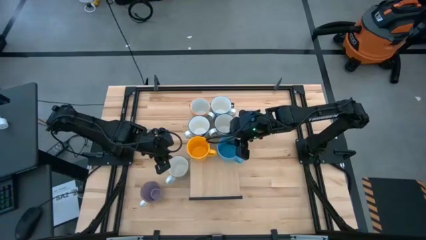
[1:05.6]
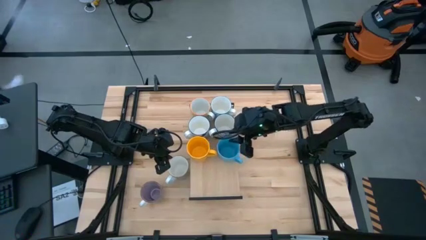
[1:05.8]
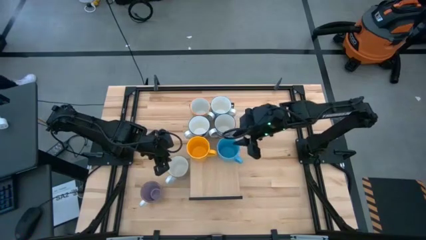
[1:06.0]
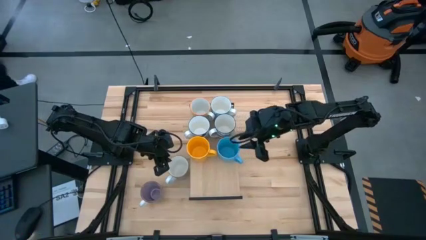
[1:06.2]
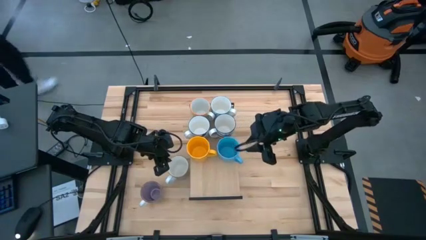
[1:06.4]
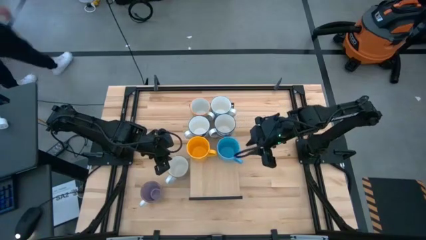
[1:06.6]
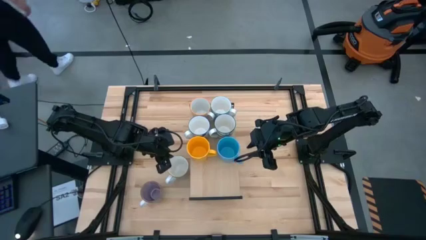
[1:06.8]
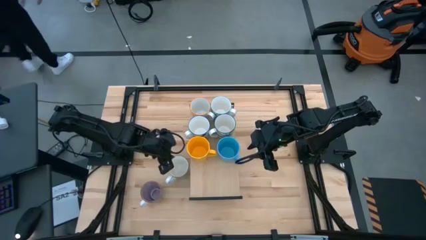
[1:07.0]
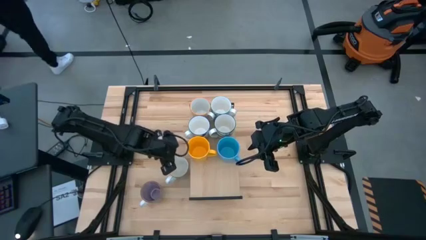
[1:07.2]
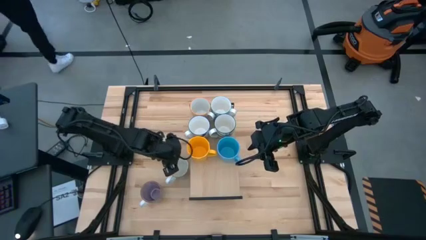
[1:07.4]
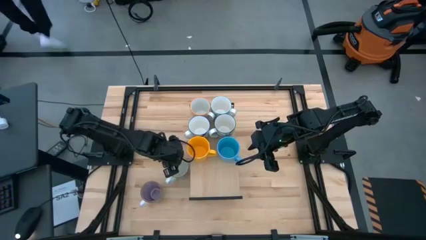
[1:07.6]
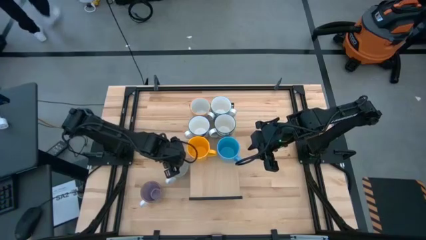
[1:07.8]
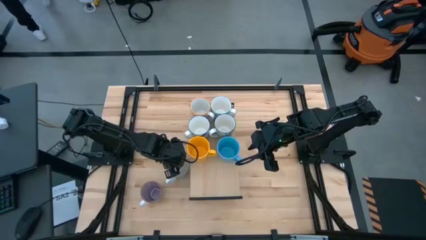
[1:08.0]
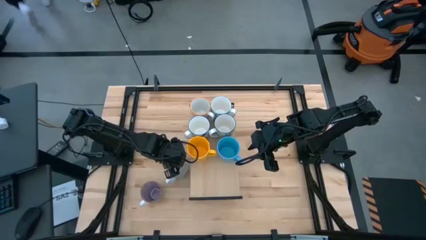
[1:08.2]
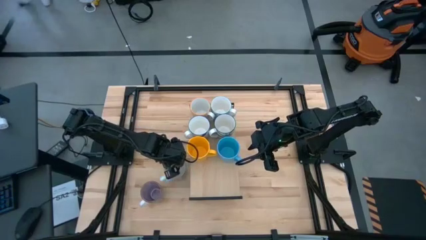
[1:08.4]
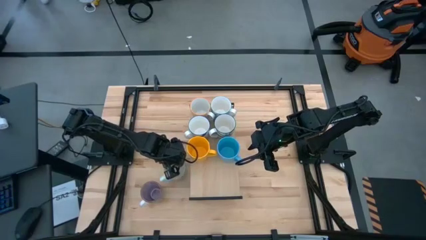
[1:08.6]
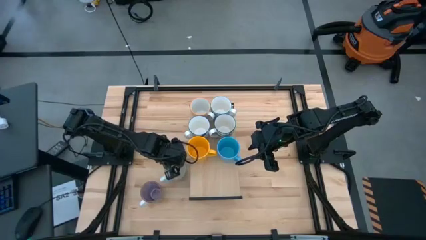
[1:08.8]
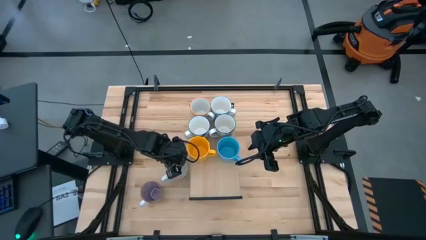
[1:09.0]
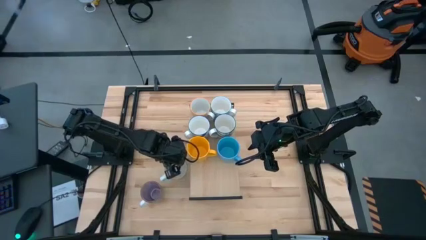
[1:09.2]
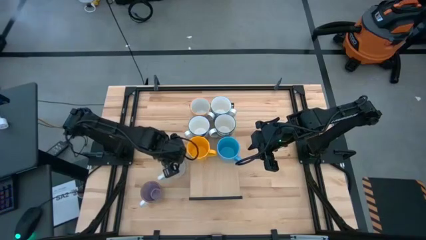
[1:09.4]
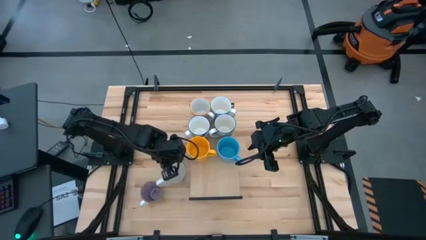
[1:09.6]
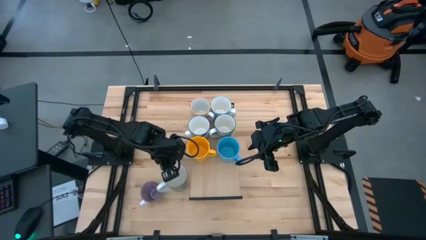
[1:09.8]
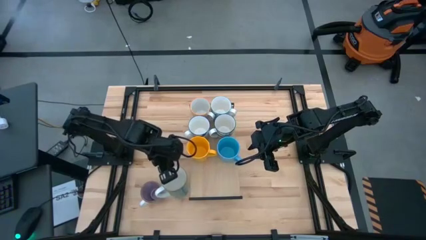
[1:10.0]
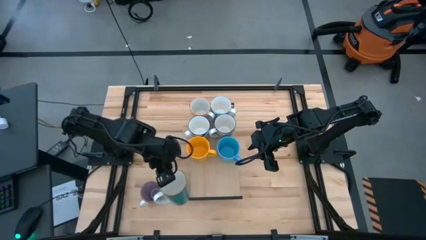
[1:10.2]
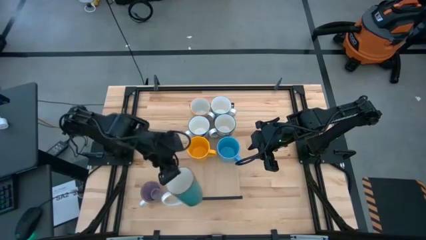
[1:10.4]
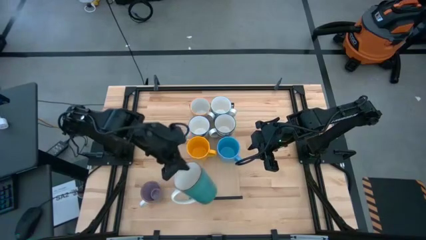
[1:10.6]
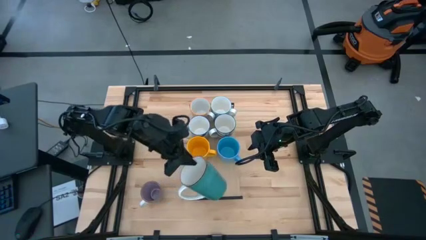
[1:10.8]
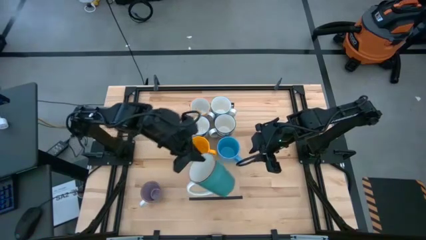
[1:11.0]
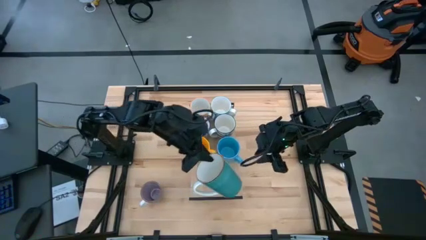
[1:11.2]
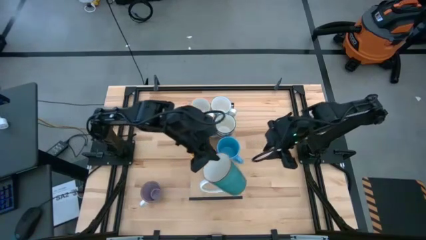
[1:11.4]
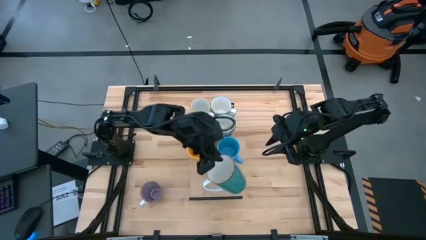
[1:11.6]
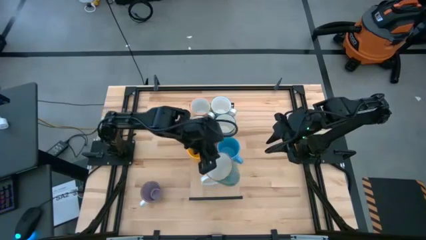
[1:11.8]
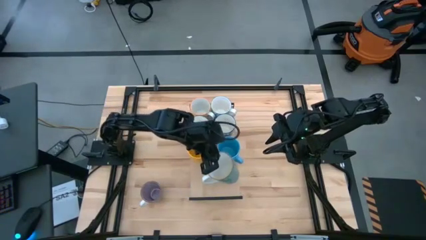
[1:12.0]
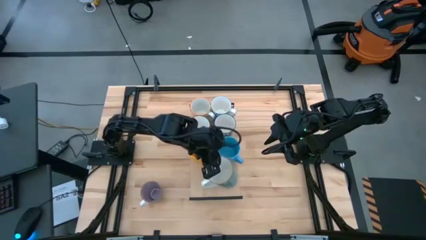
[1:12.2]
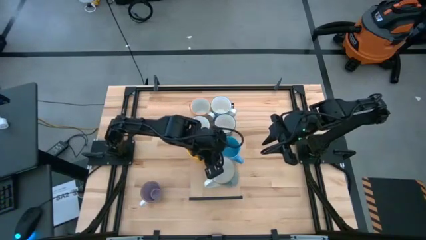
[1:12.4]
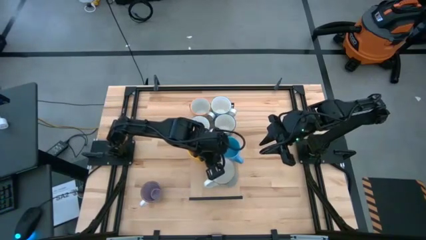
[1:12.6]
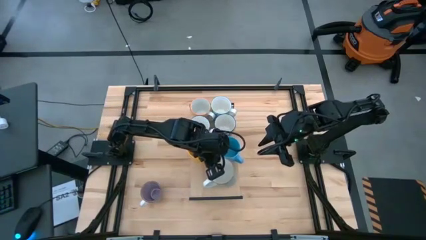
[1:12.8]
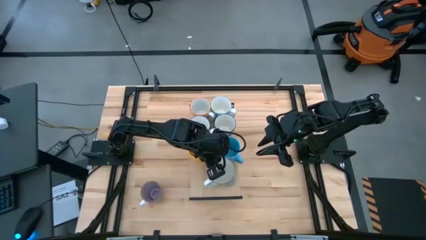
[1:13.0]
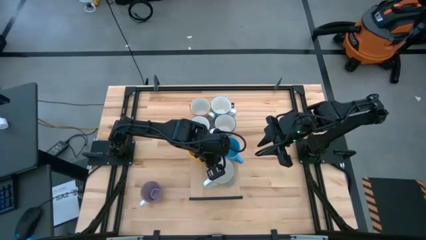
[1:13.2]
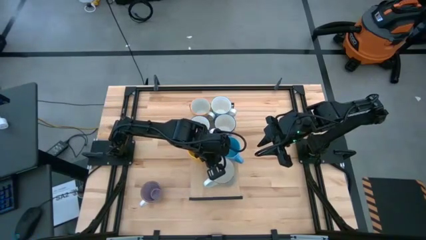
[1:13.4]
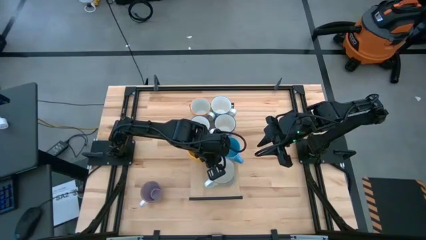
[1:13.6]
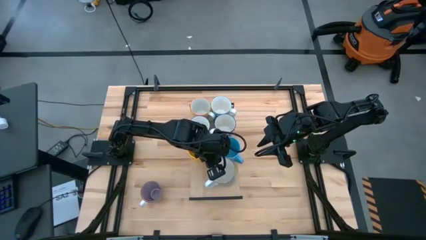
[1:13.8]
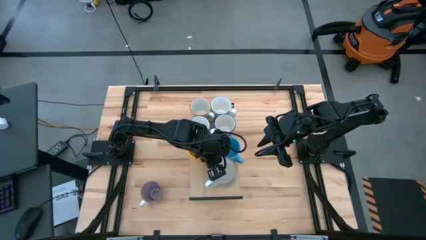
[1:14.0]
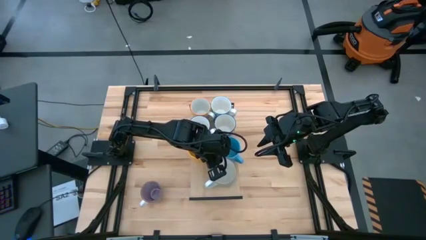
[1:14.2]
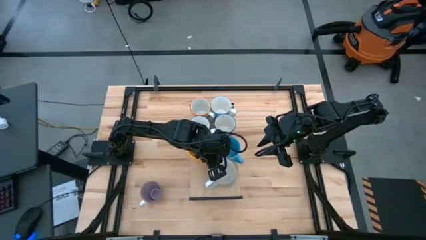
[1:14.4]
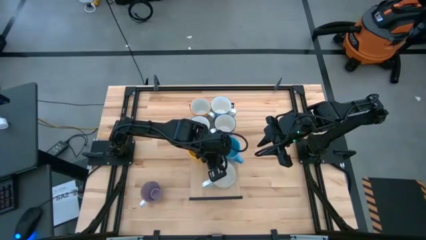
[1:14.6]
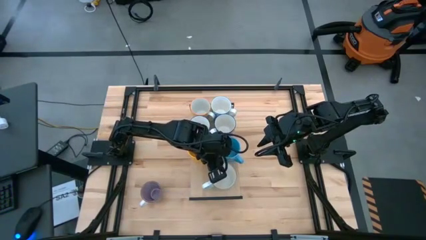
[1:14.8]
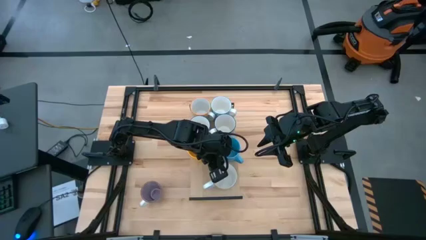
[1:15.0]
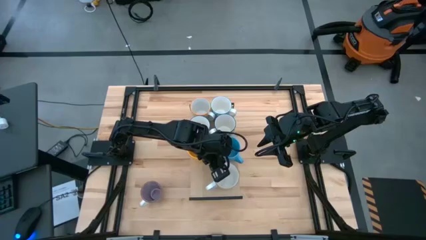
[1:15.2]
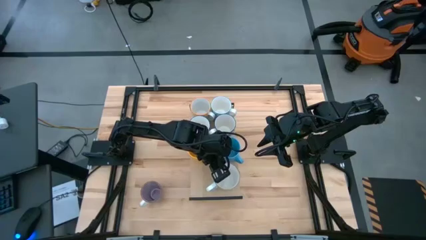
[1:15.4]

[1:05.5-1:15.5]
Task: Place coffee mugs
Put the green mug on the shelf
